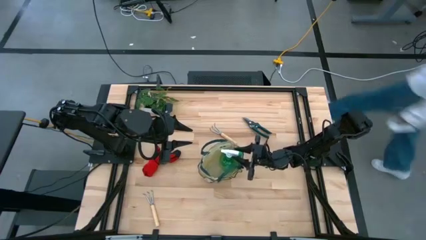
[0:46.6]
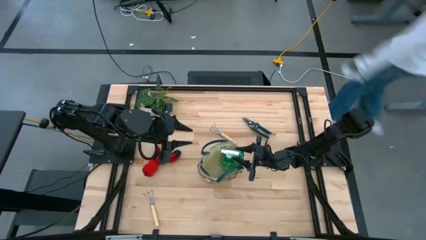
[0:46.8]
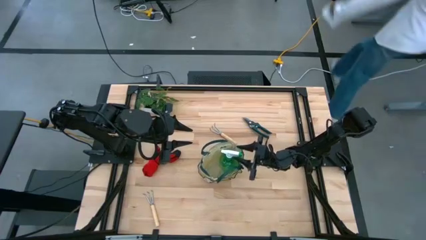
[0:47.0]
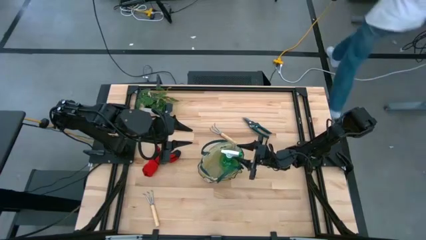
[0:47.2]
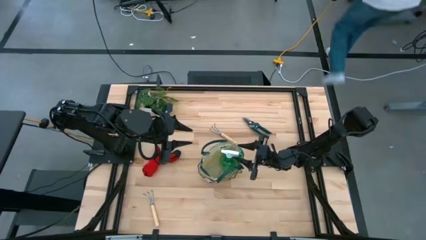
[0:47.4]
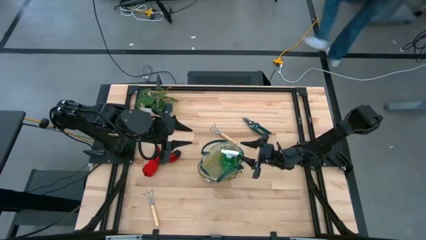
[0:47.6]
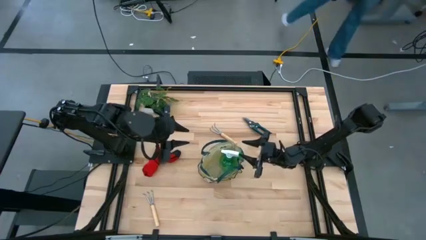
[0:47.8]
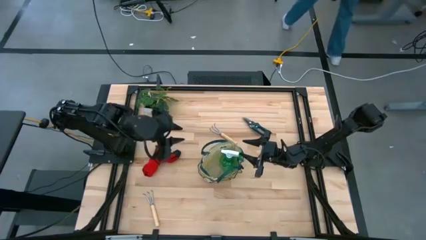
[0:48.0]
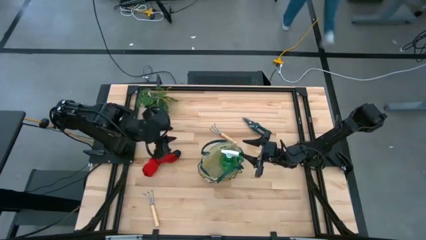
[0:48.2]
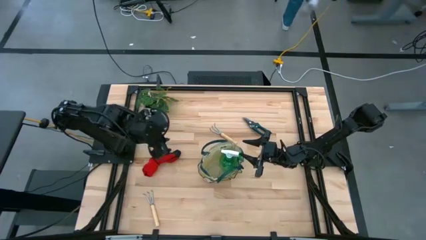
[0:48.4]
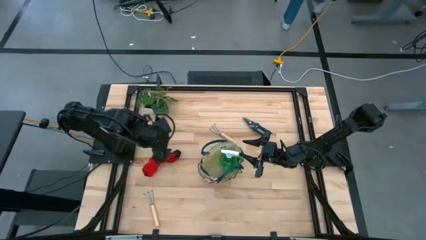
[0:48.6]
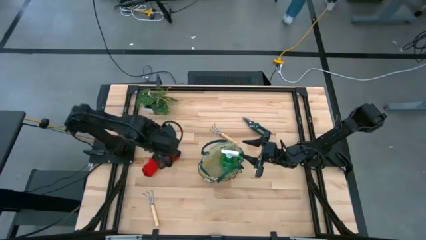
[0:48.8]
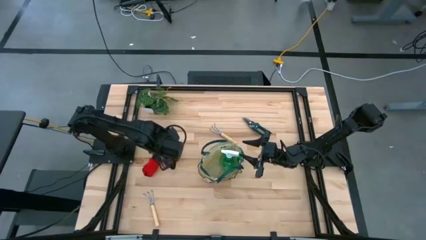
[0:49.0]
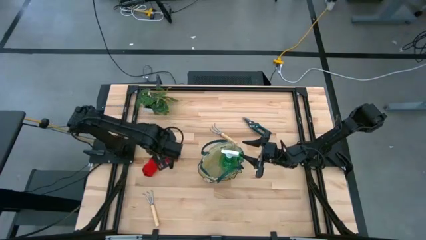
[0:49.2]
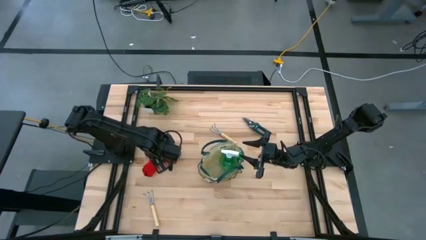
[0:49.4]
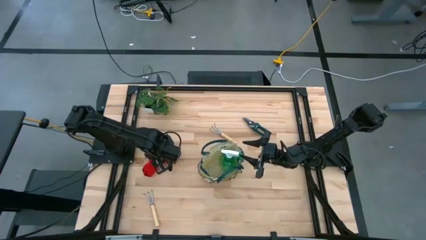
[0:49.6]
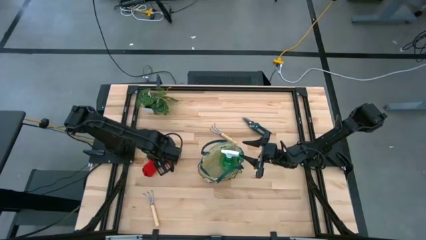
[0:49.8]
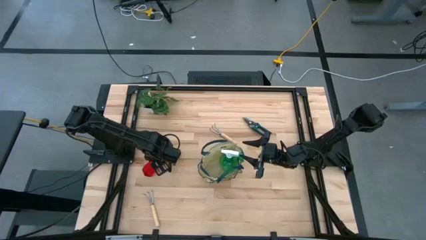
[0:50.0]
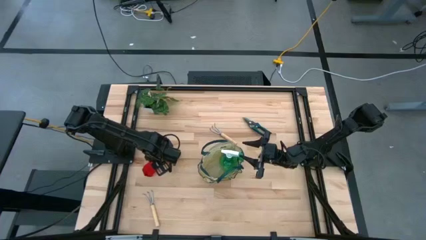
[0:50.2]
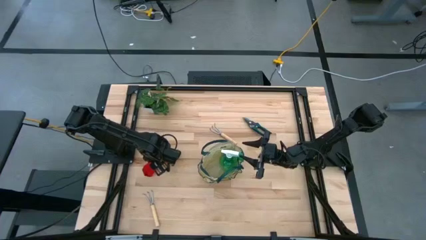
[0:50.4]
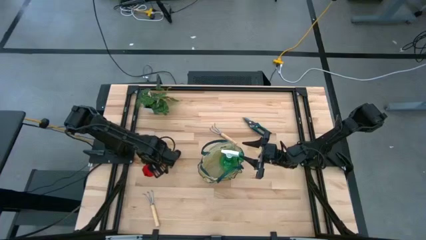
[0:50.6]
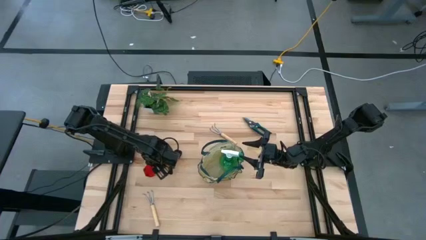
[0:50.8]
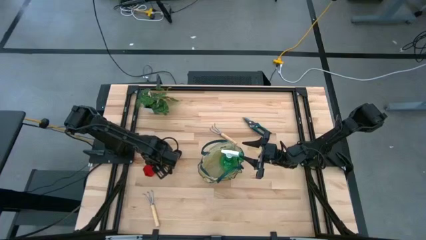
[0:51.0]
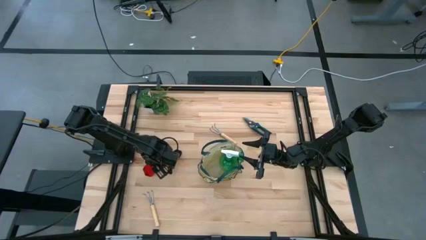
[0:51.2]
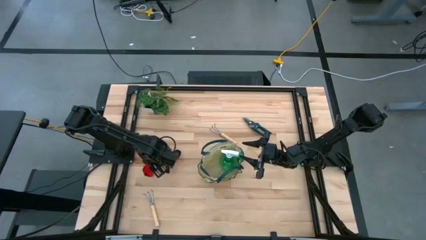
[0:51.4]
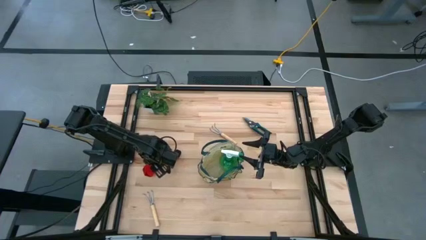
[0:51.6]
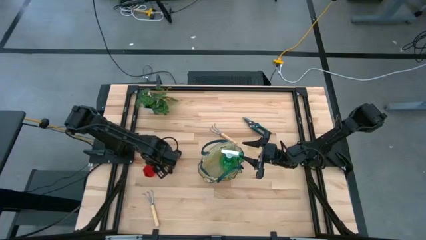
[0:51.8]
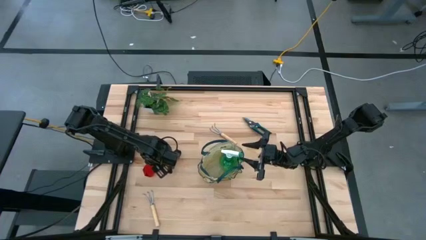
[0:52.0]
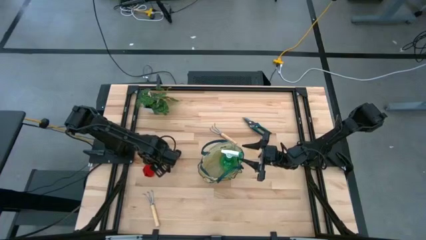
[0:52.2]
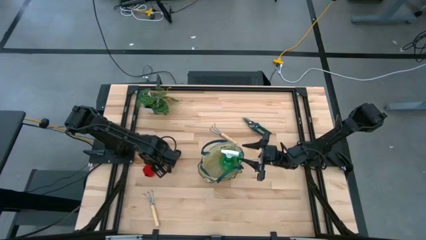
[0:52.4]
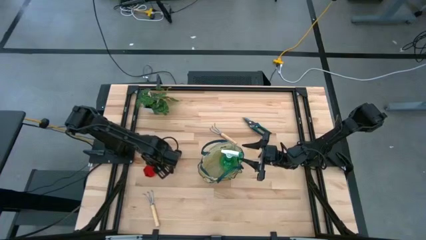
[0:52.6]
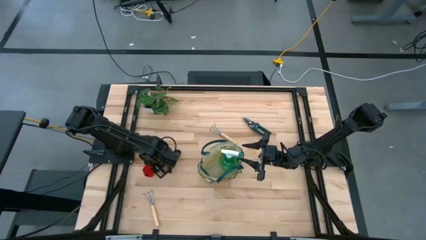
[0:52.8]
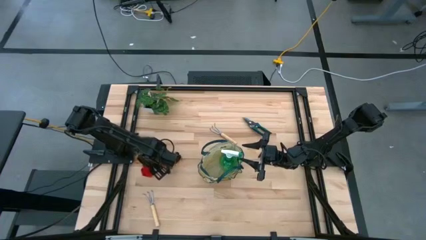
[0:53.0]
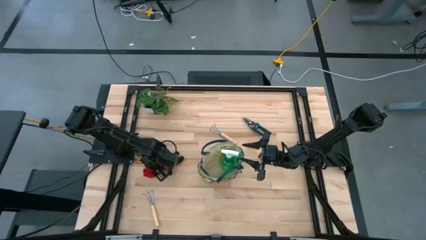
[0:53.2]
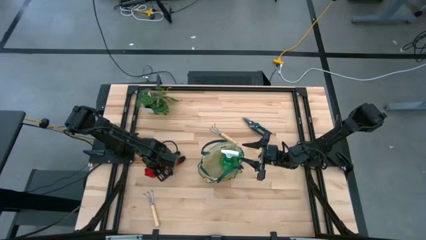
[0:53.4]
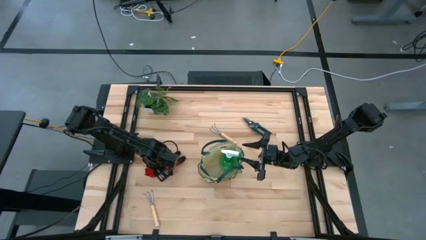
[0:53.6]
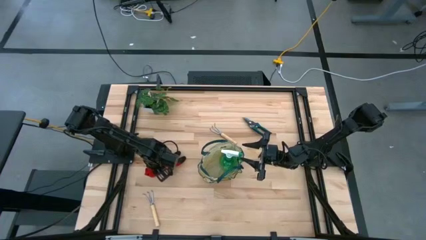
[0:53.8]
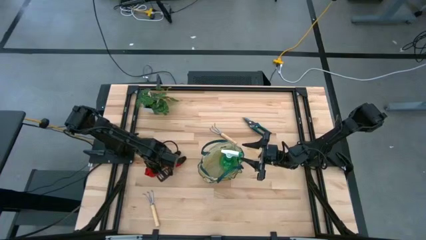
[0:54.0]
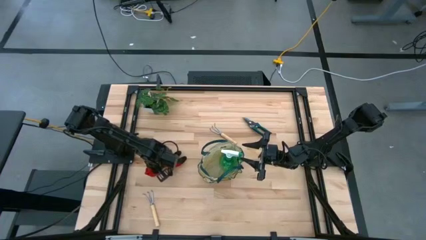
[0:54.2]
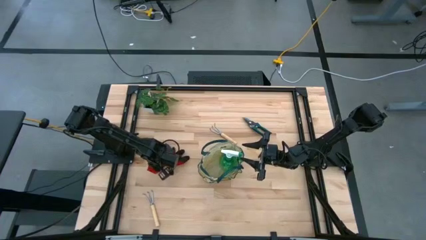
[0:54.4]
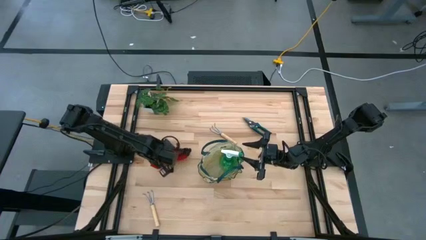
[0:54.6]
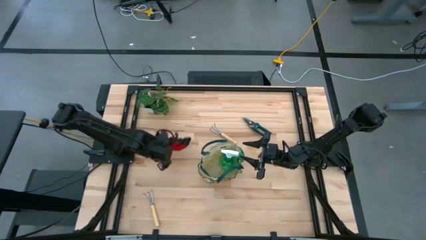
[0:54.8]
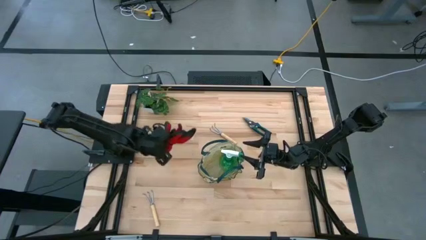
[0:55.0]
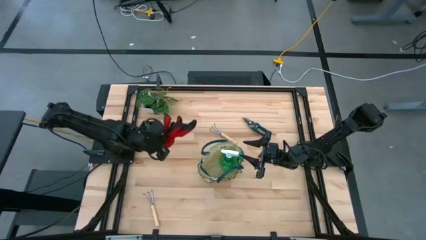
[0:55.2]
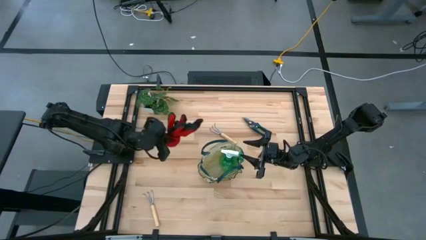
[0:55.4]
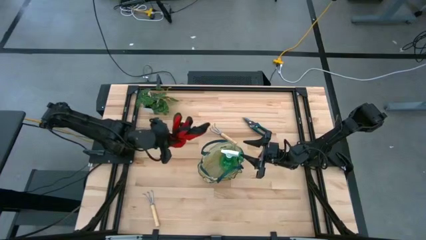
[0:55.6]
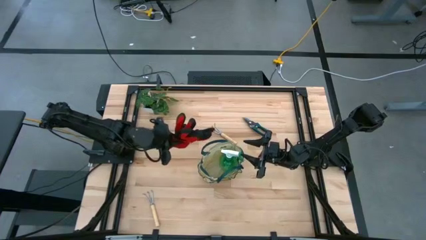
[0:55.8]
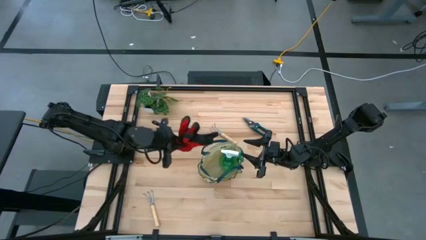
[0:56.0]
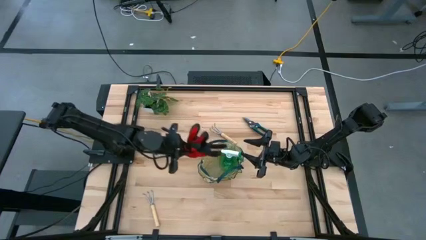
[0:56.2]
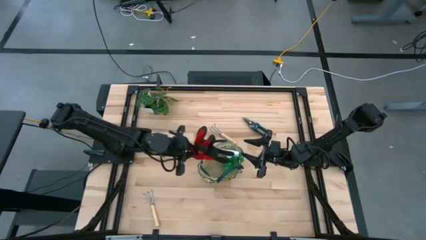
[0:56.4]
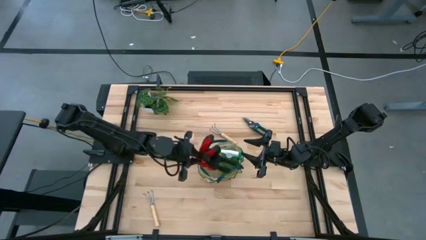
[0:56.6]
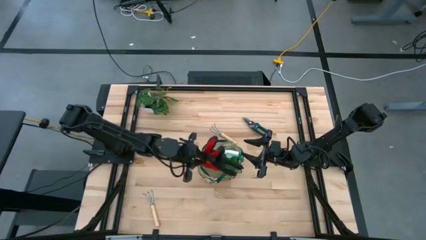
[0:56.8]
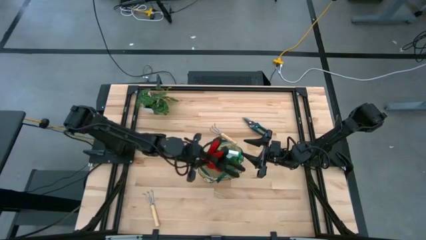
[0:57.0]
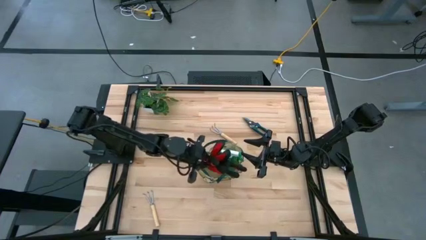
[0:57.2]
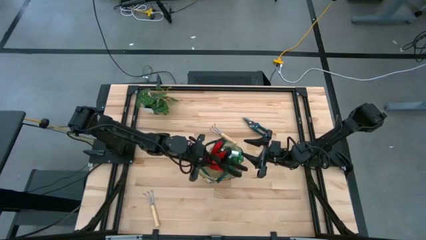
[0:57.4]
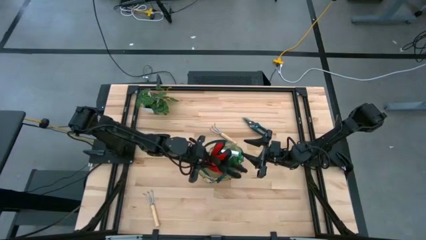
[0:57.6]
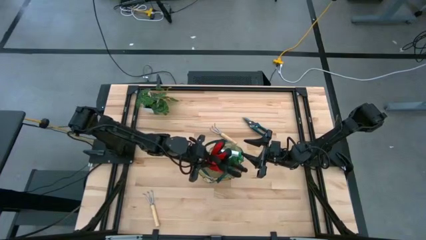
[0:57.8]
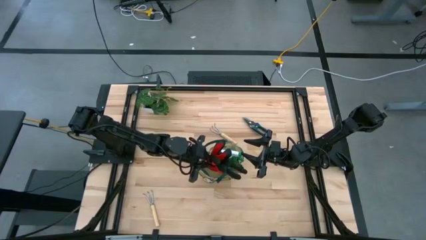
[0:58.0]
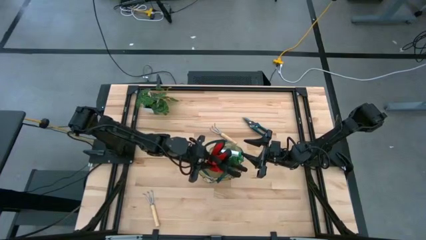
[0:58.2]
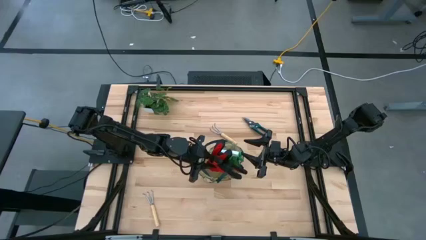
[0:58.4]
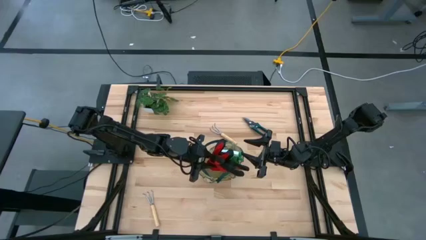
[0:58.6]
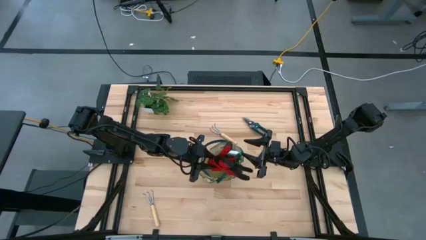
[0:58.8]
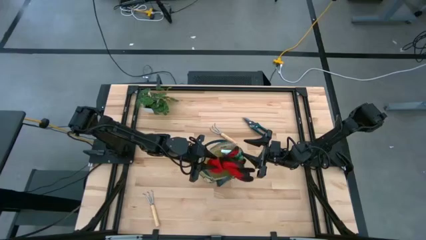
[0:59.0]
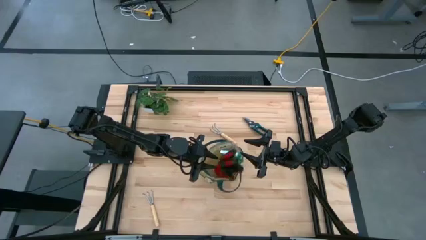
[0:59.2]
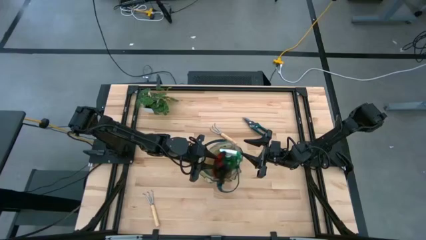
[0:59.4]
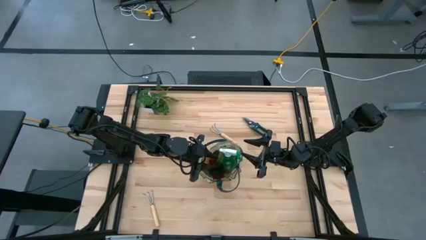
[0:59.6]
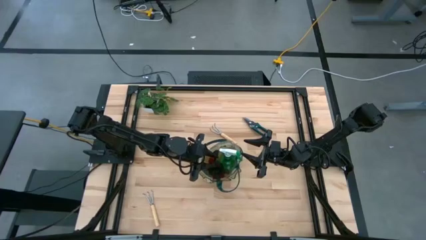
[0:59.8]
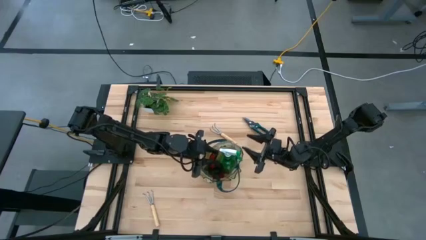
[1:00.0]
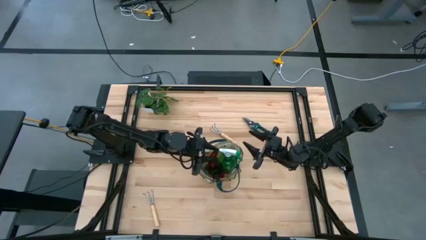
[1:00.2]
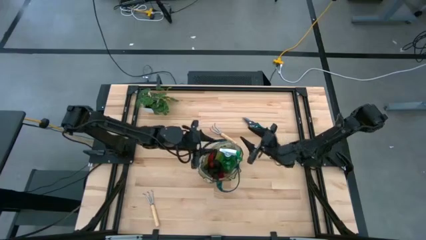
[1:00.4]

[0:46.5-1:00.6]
Task: Pick & Place Garden tools in Gardening bag
Put the red glove into the green gardening bag

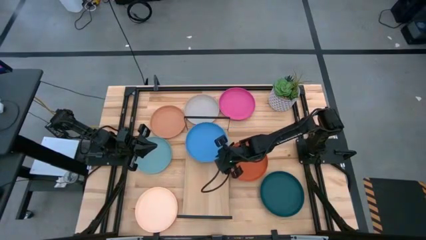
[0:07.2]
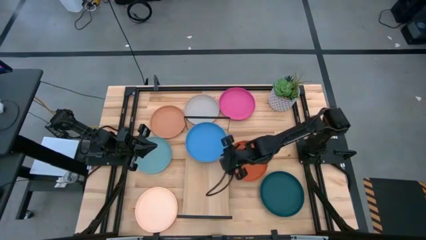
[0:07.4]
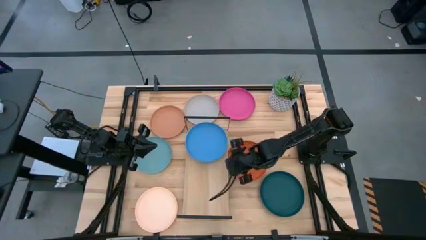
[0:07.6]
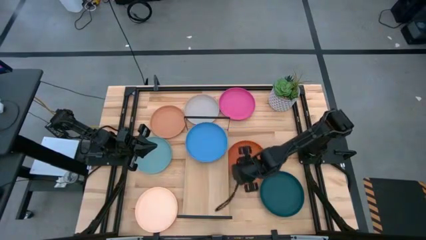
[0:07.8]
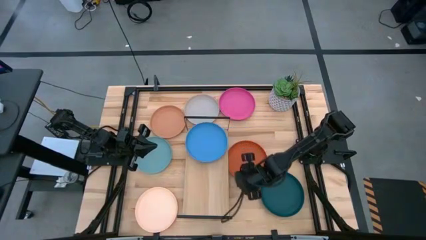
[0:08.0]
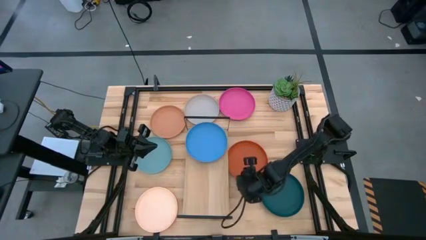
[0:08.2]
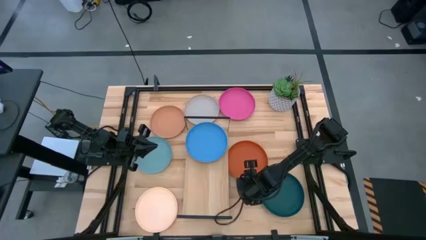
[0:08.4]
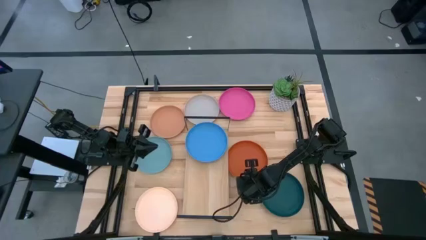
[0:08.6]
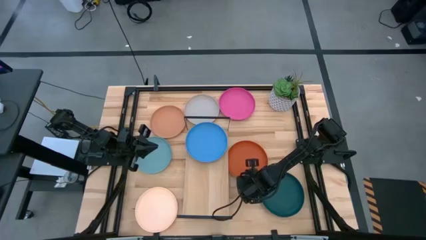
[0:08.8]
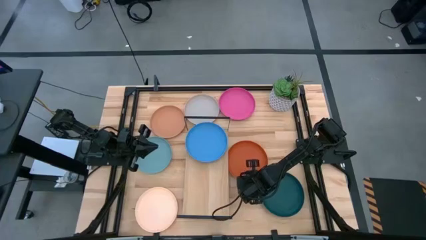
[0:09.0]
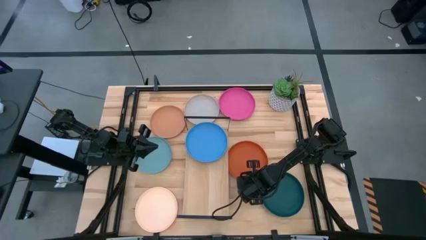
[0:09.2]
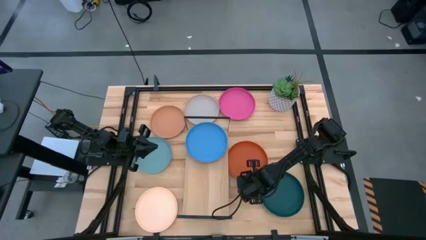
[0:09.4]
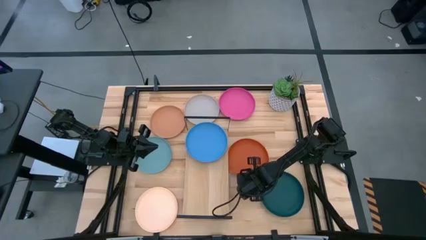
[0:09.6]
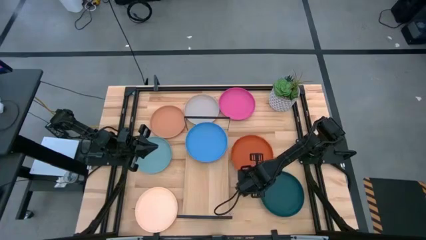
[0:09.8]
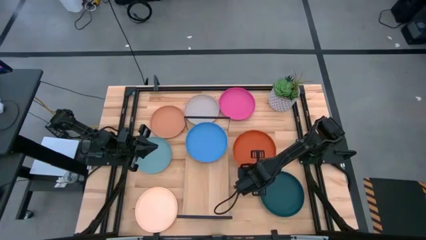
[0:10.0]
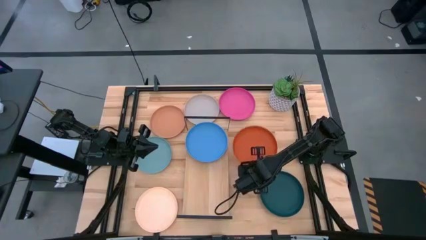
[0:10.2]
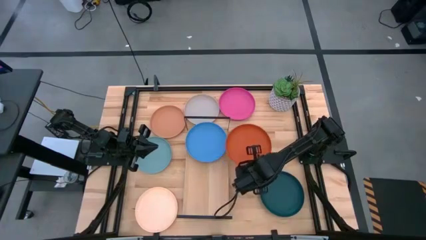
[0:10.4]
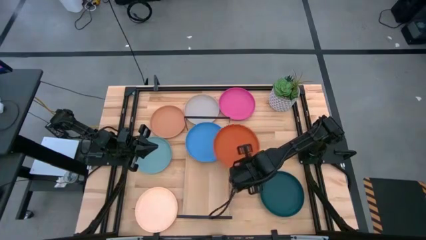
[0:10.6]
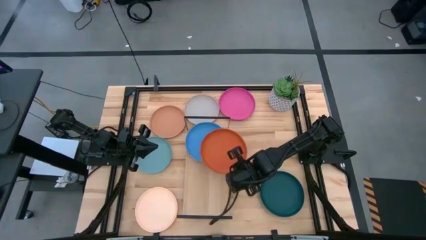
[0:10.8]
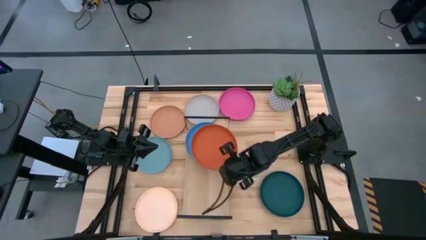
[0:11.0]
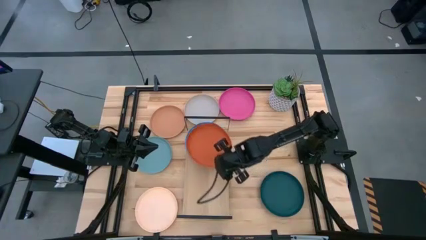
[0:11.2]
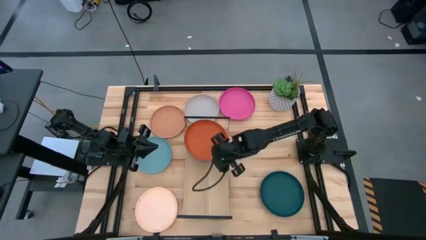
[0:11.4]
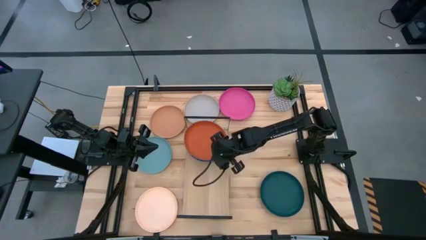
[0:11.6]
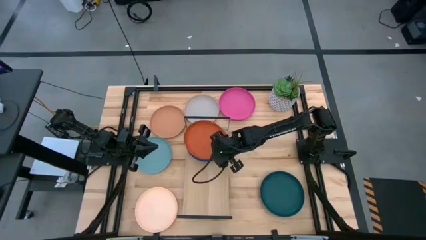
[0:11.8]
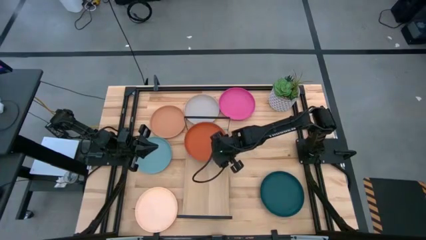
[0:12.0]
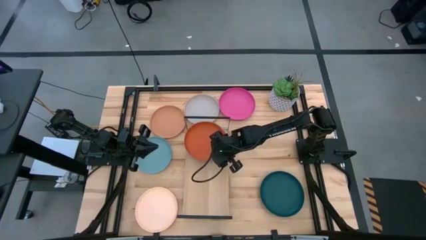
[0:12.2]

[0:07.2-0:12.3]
Task: Place and stack plates onto a shelf
Stack the orange plate on top of the blue plate
